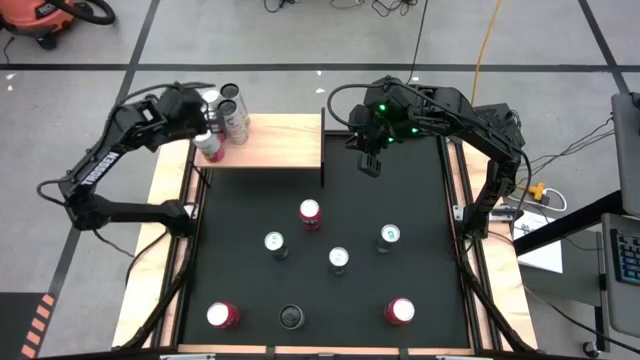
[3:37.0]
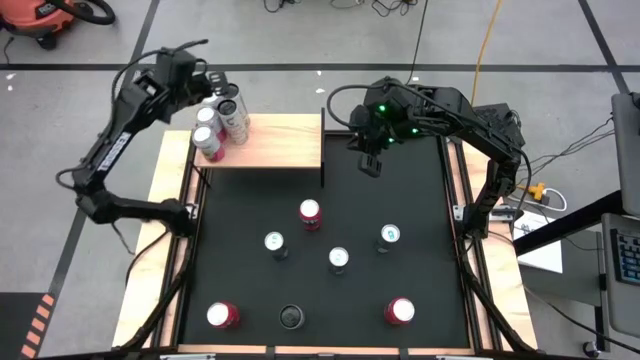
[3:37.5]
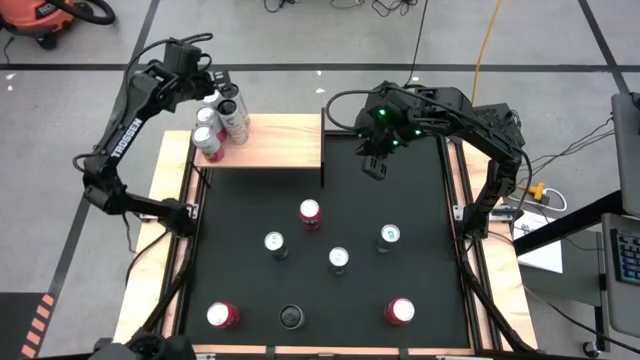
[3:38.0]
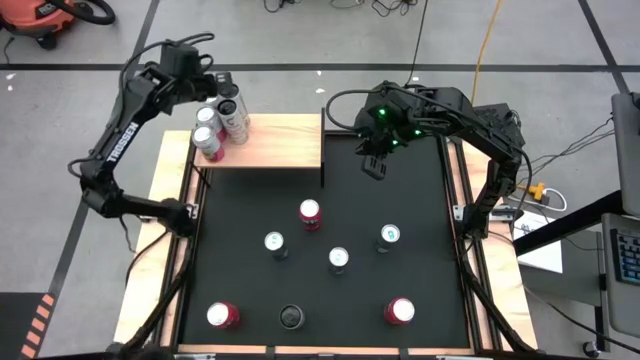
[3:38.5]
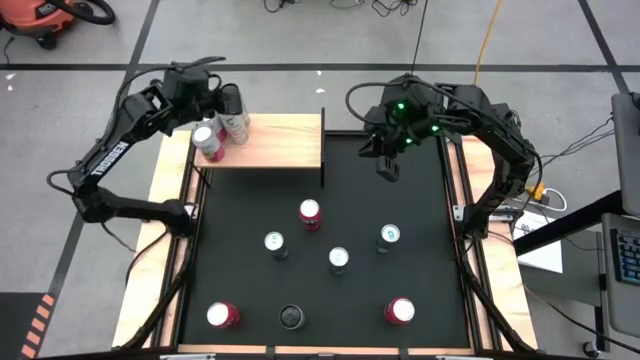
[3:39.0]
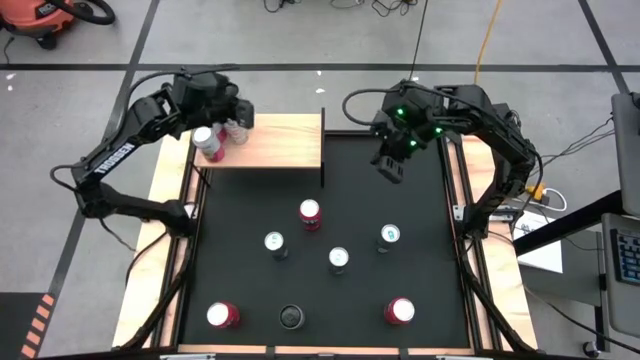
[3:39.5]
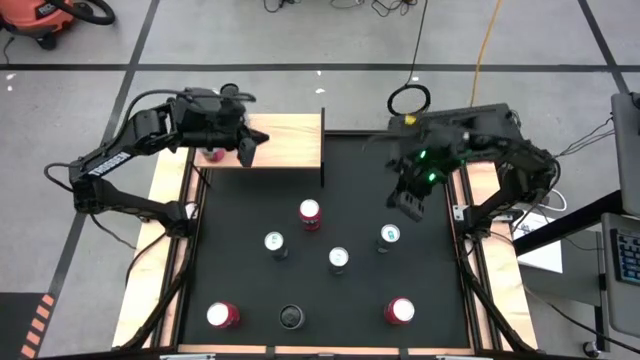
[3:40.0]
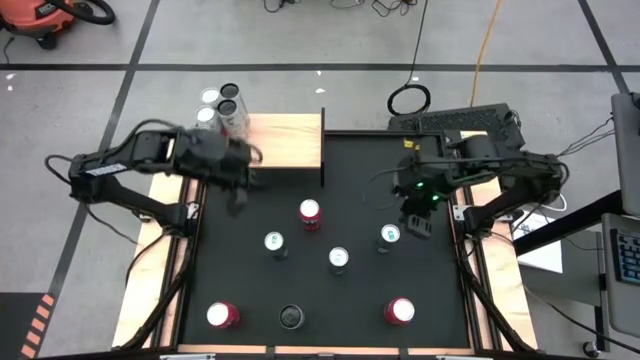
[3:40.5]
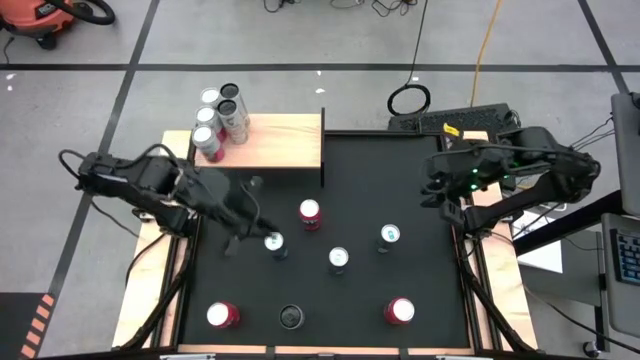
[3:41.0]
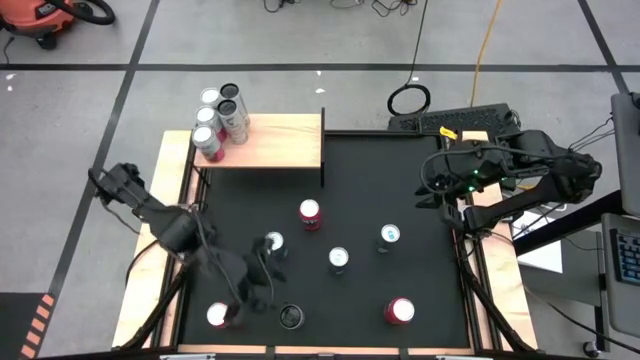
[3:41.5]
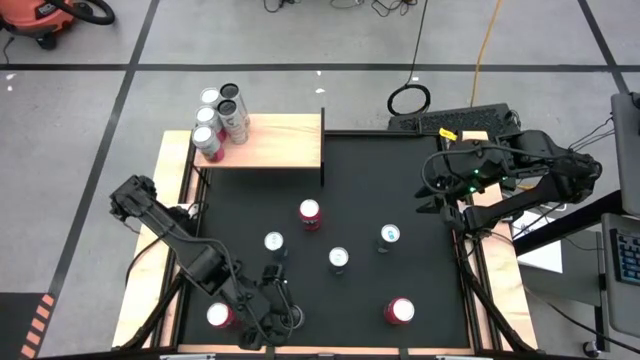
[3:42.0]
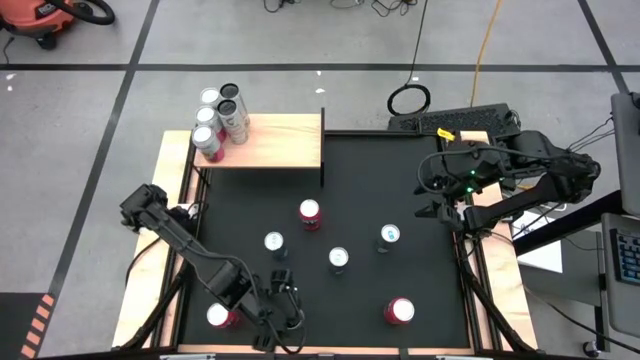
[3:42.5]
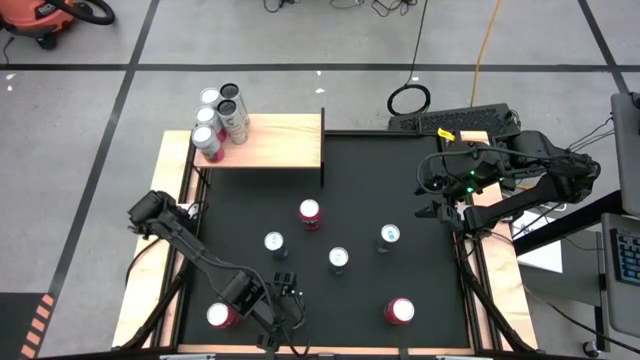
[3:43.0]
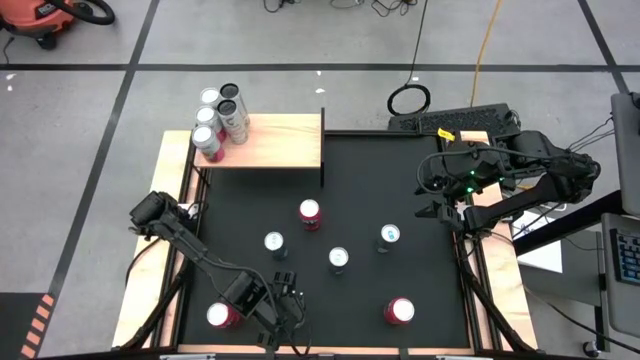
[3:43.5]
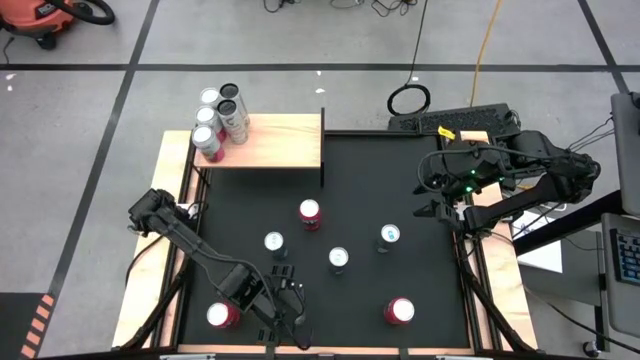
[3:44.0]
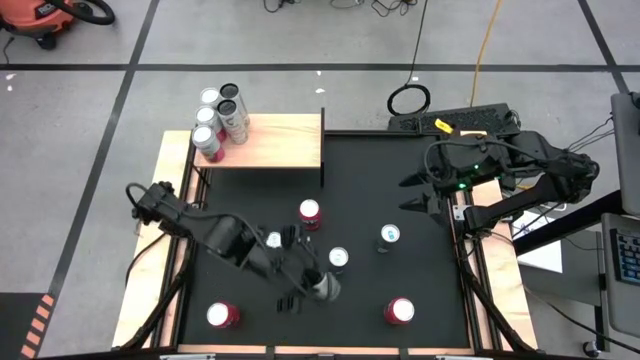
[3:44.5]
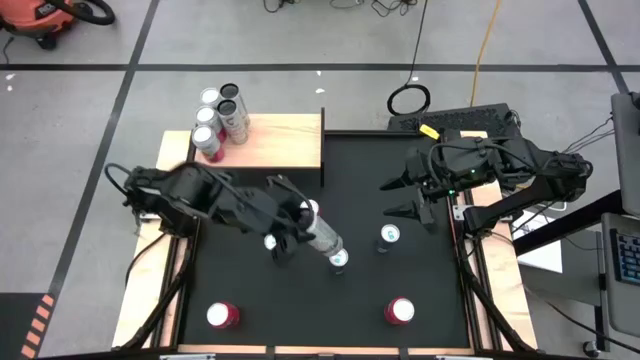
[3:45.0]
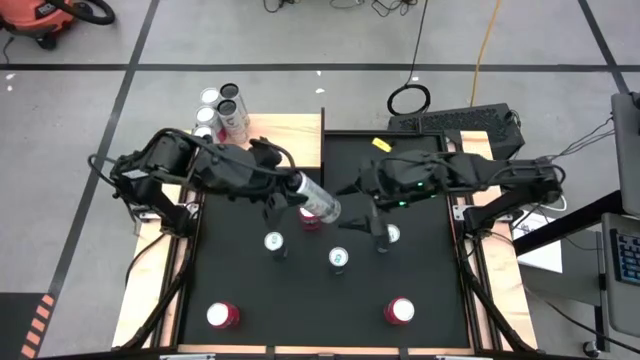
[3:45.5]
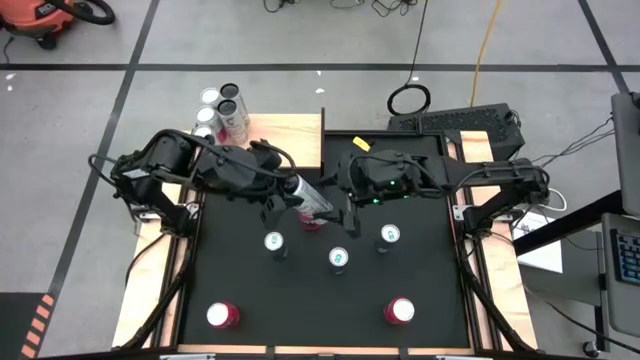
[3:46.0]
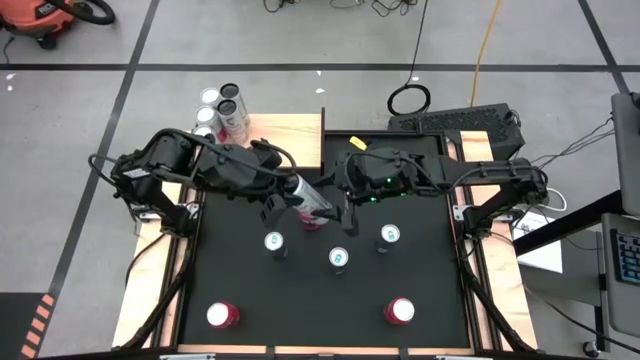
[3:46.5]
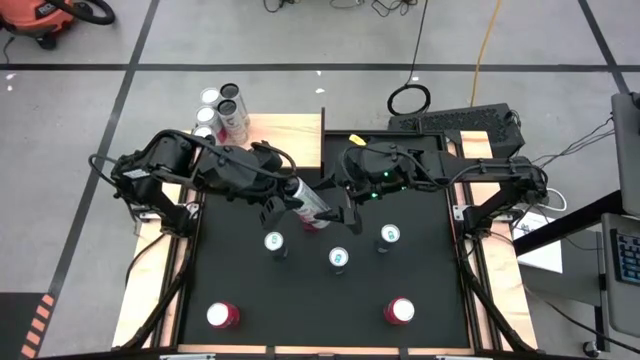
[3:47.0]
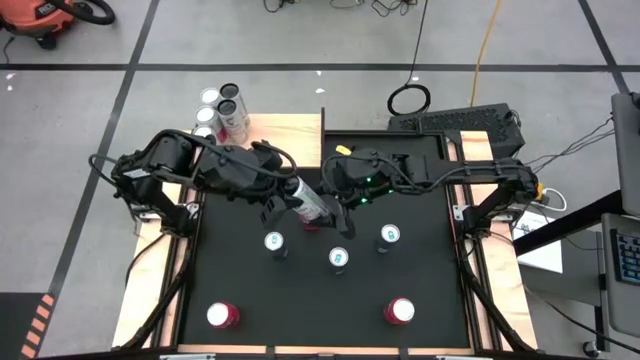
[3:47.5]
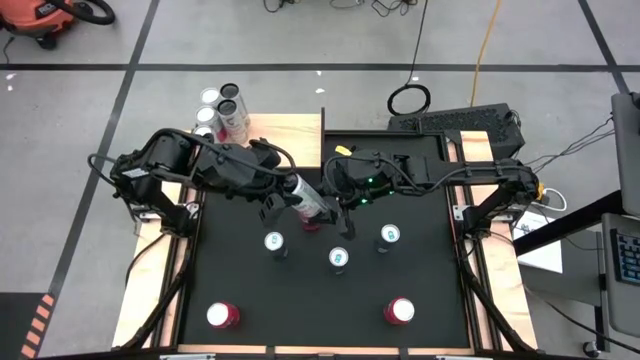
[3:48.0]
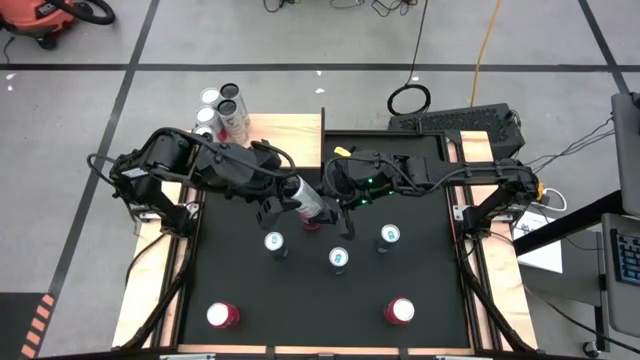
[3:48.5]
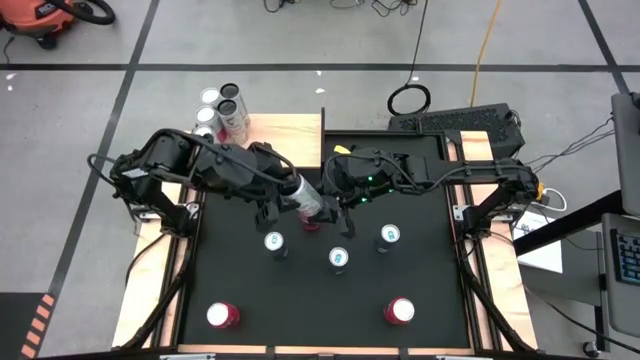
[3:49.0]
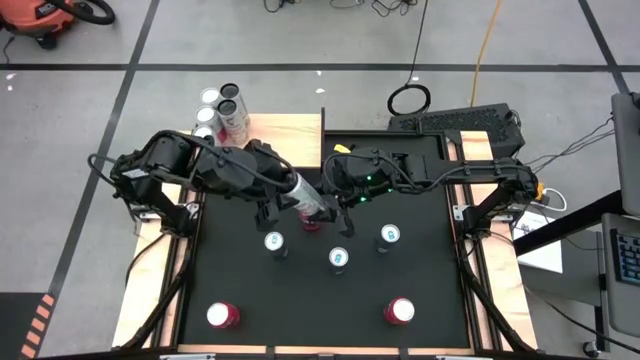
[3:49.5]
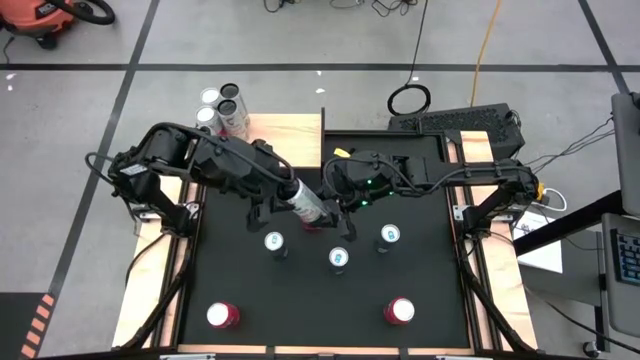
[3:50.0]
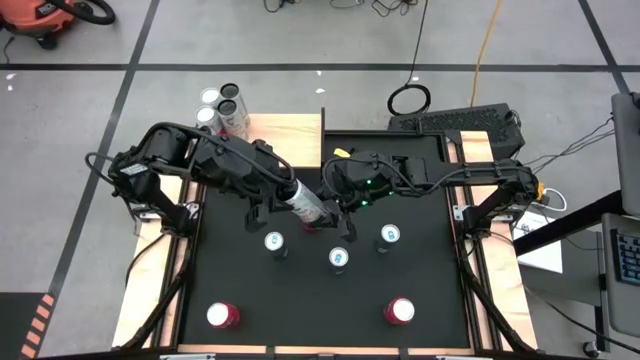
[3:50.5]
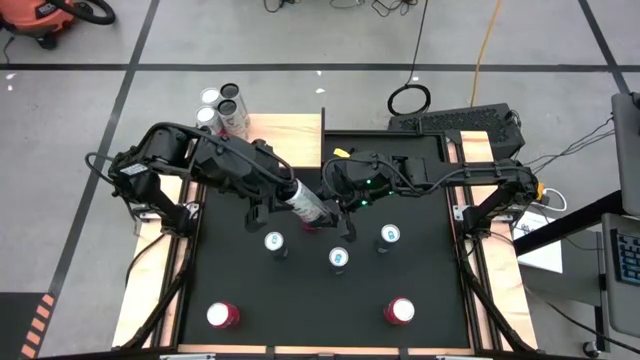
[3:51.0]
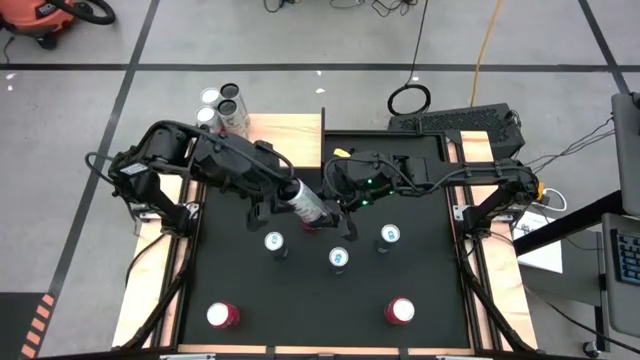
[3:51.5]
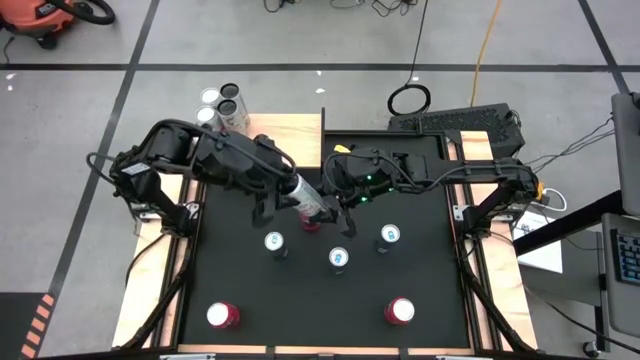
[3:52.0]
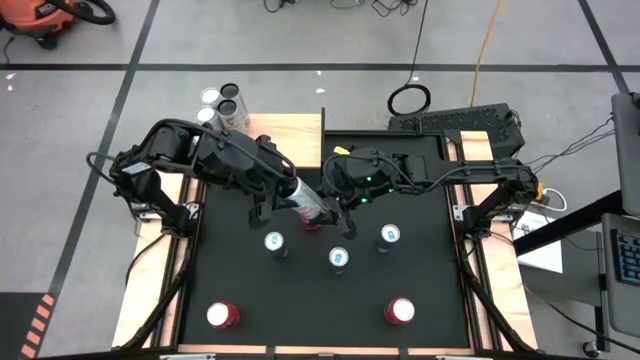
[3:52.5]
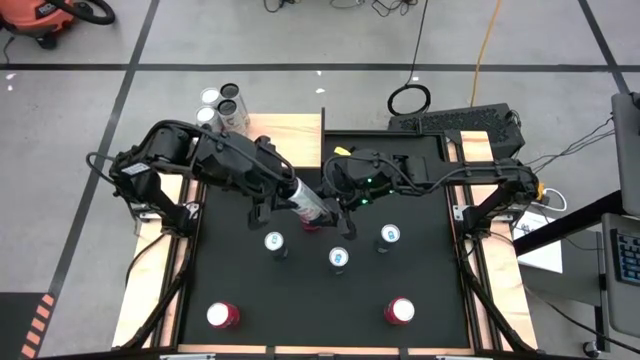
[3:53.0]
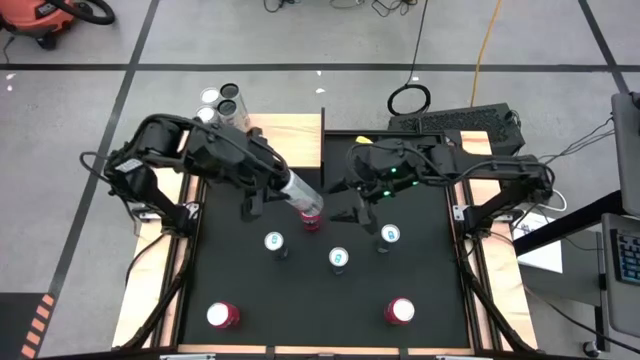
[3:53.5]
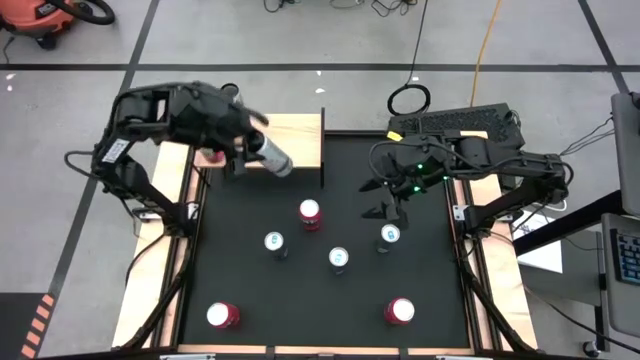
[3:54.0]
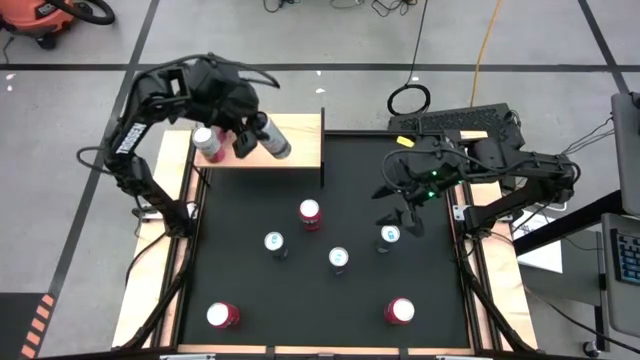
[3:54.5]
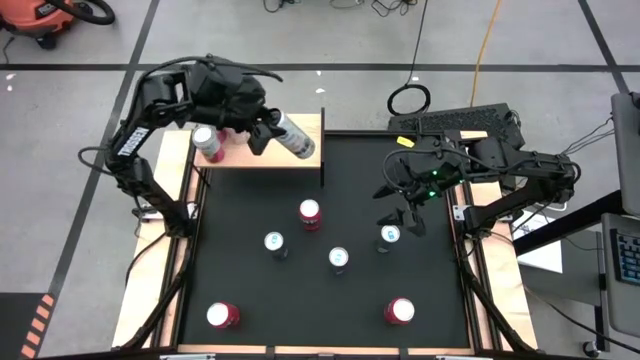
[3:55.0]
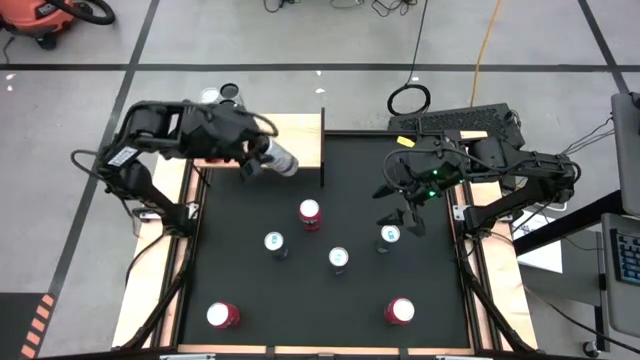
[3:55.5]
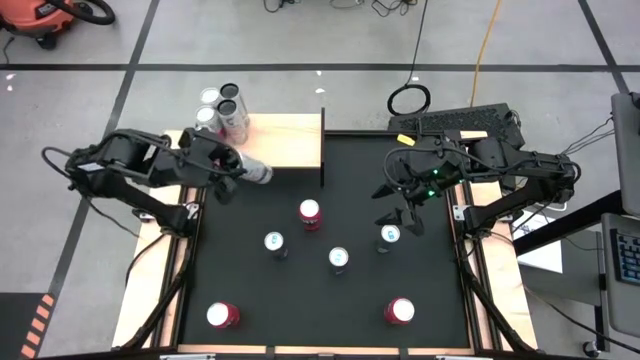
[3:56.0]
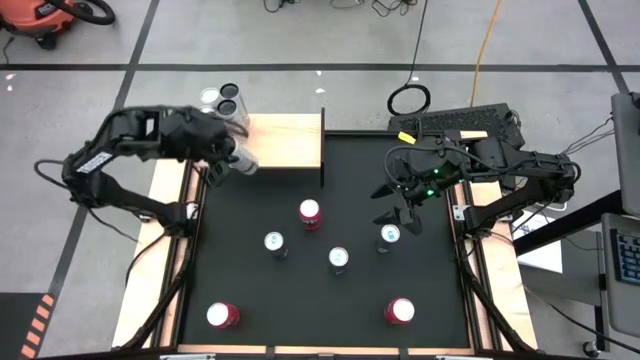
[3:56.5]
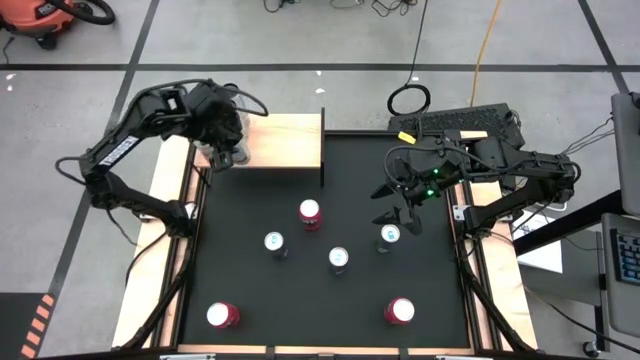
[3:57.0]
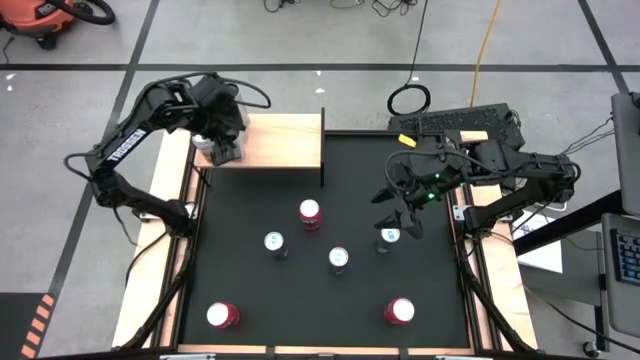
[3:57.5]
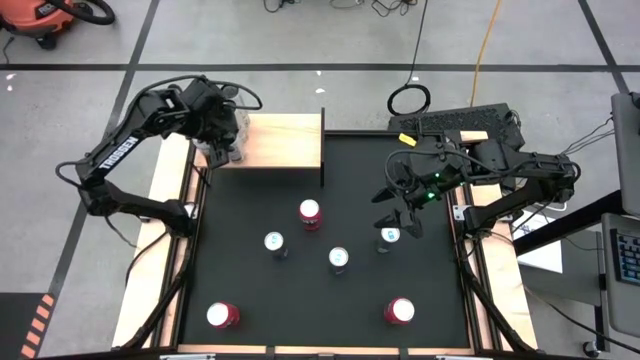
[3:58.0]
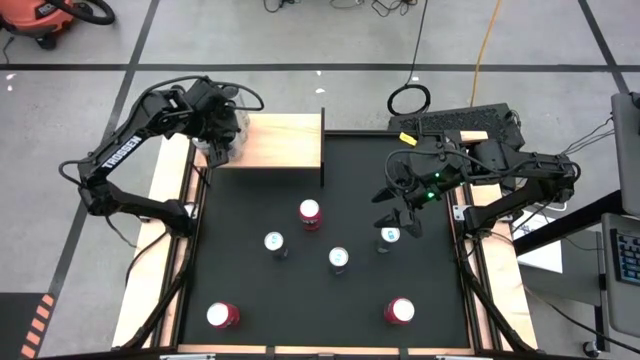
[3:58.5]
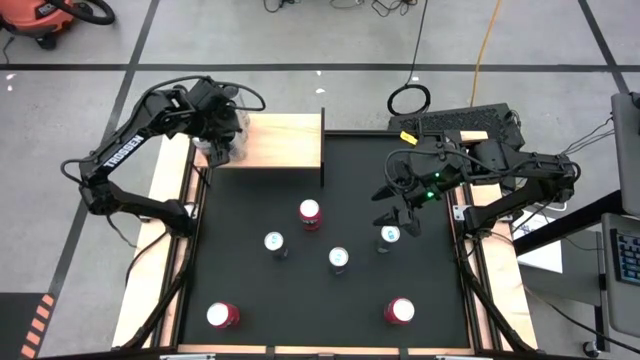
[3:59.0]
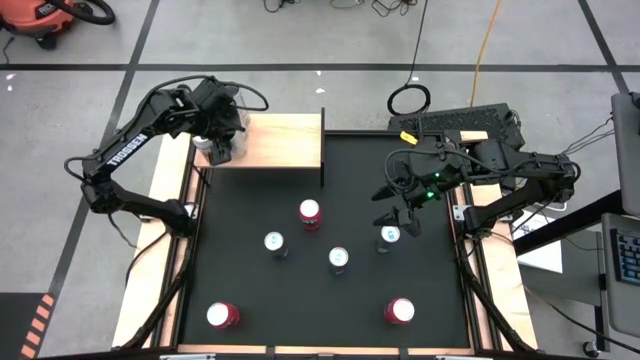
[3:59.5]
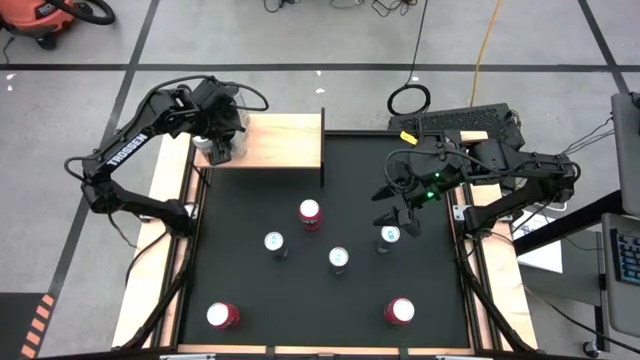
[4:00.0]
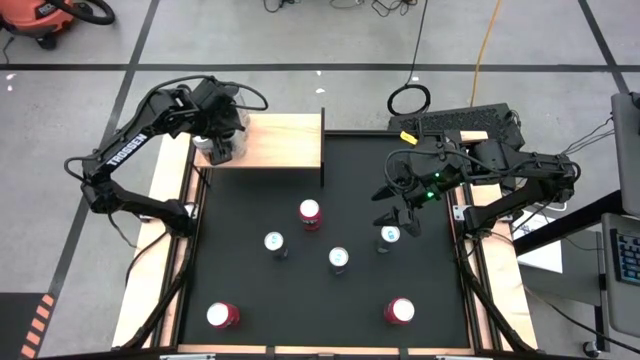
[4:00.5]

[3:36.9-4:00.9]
Task: Place canned beverage on shelf
Put the white yellow soda can on the shelf aligned with the other white yellow soda cans
